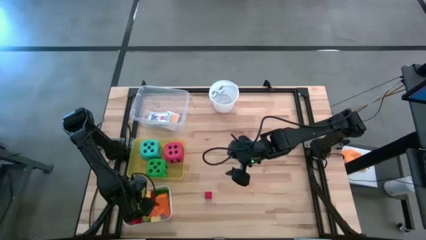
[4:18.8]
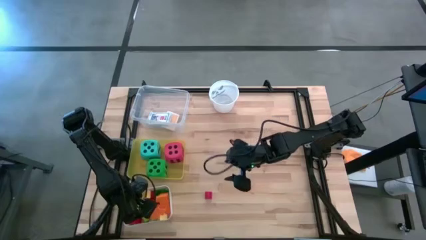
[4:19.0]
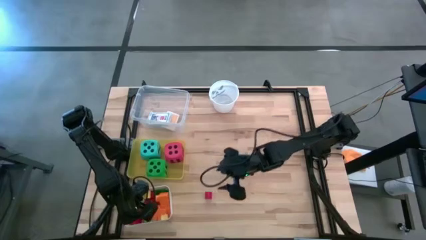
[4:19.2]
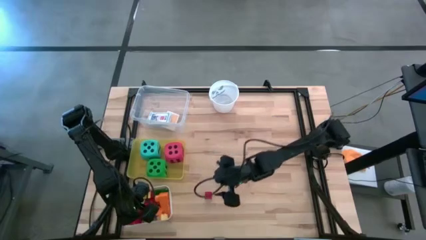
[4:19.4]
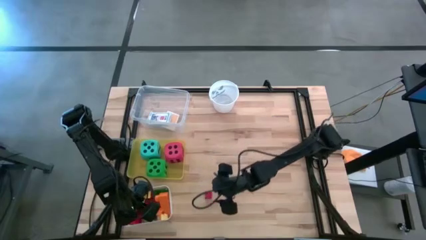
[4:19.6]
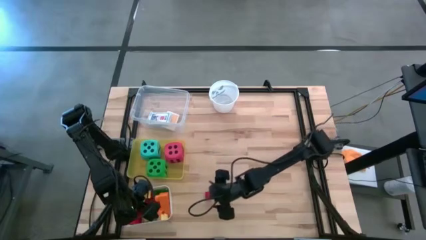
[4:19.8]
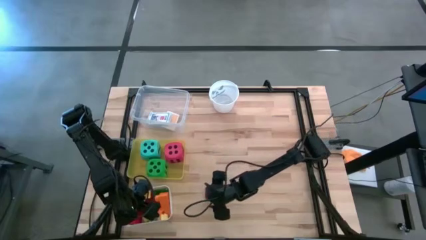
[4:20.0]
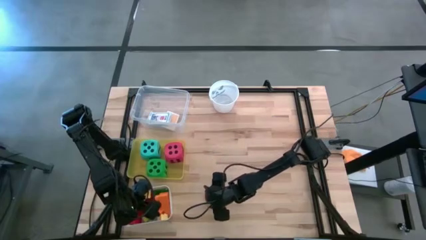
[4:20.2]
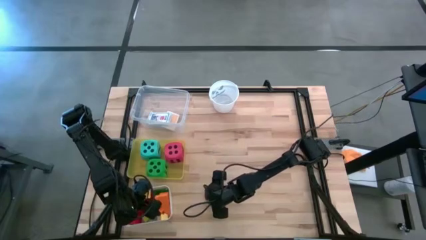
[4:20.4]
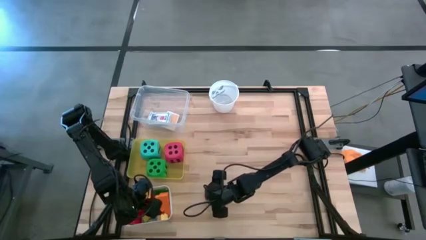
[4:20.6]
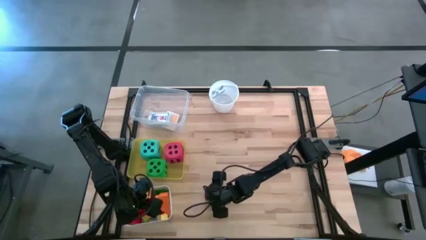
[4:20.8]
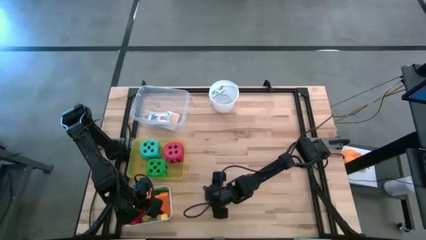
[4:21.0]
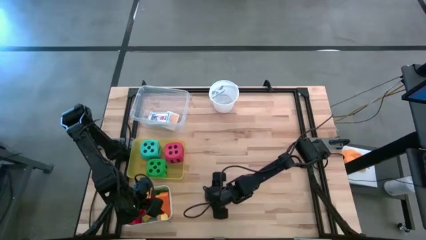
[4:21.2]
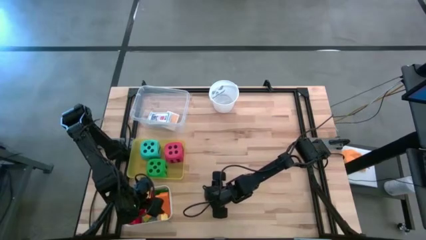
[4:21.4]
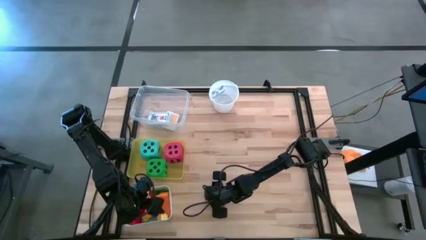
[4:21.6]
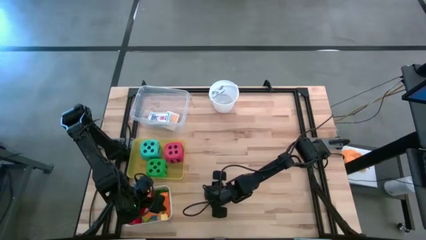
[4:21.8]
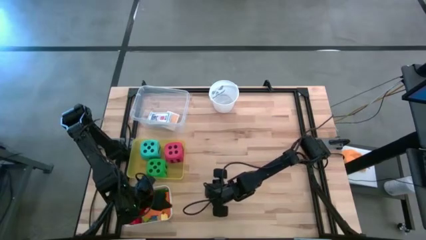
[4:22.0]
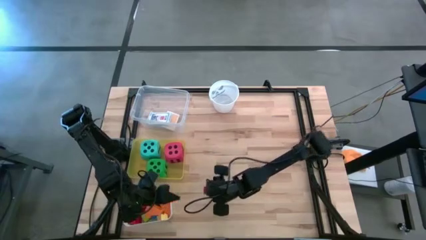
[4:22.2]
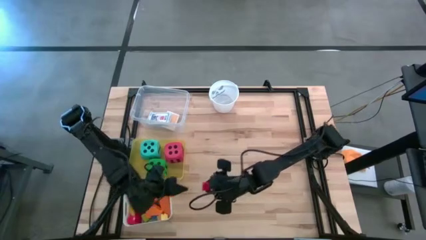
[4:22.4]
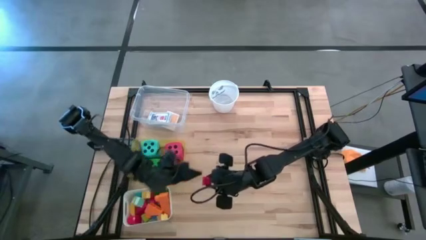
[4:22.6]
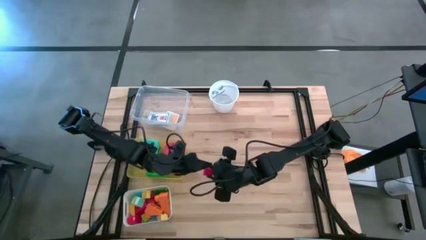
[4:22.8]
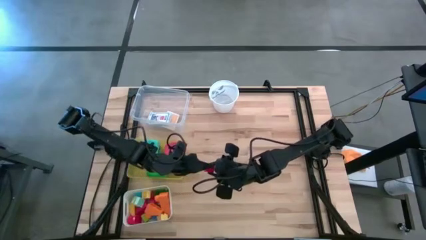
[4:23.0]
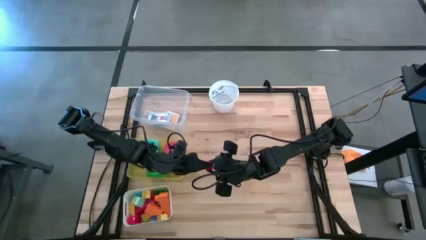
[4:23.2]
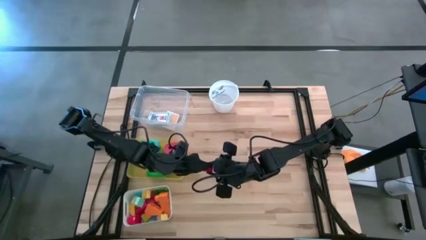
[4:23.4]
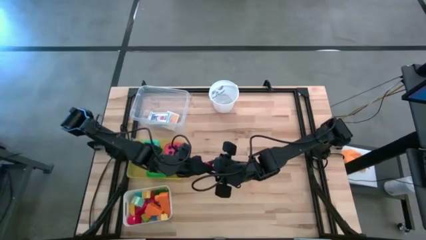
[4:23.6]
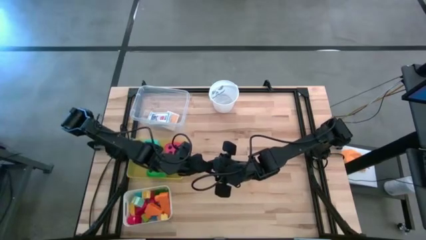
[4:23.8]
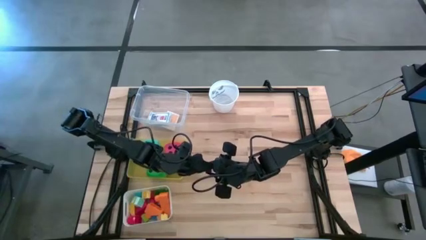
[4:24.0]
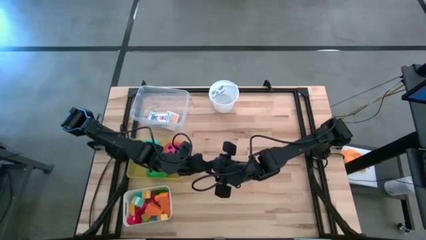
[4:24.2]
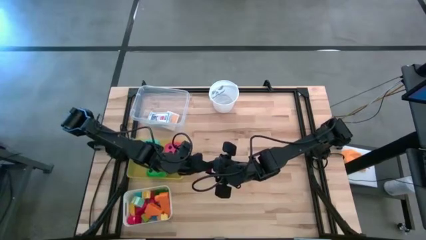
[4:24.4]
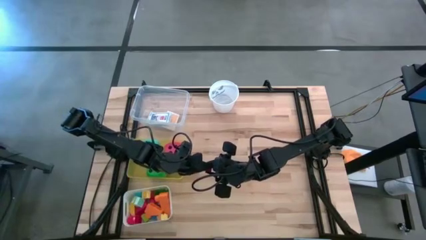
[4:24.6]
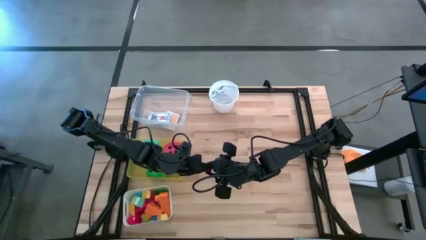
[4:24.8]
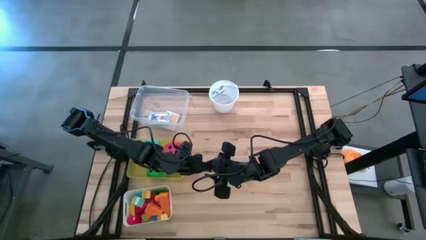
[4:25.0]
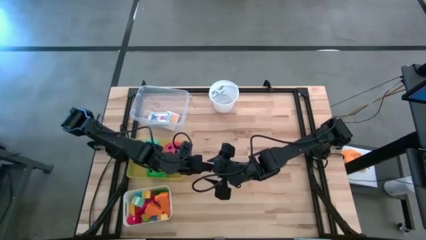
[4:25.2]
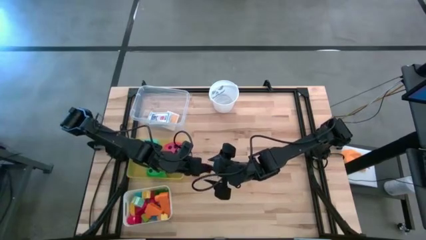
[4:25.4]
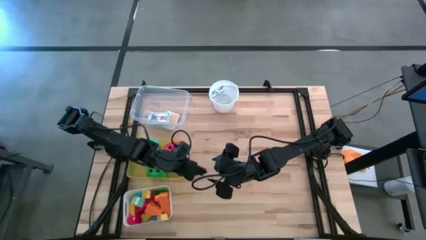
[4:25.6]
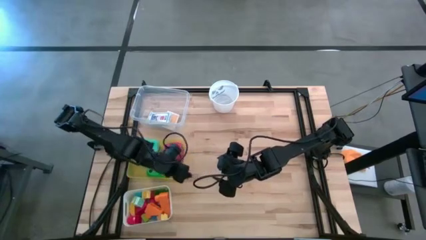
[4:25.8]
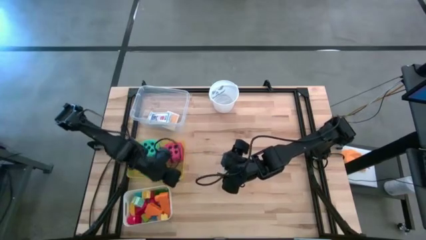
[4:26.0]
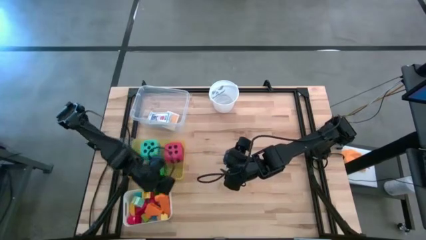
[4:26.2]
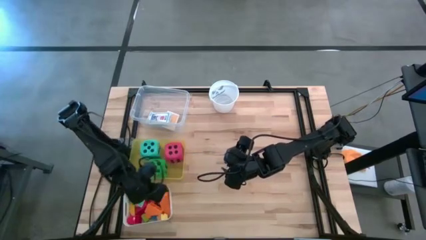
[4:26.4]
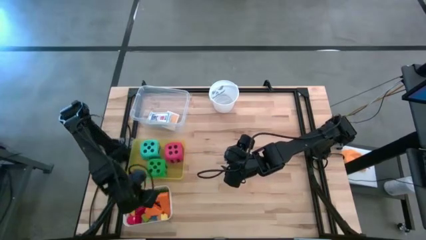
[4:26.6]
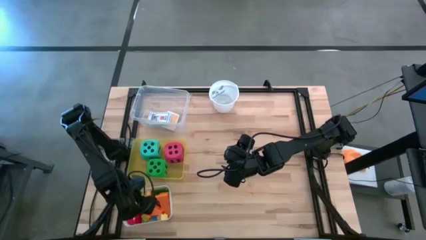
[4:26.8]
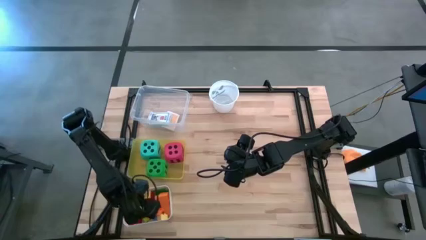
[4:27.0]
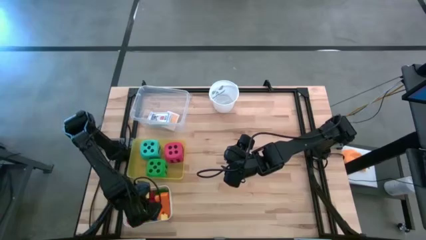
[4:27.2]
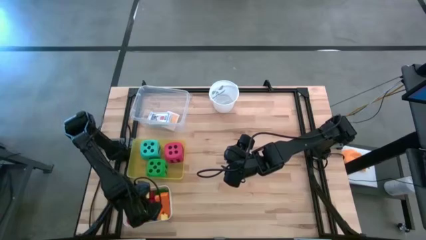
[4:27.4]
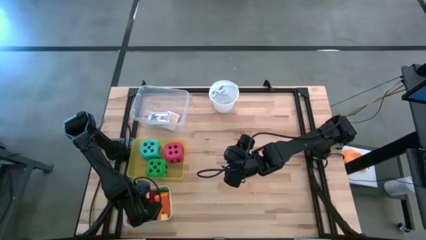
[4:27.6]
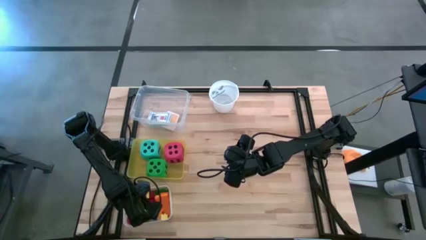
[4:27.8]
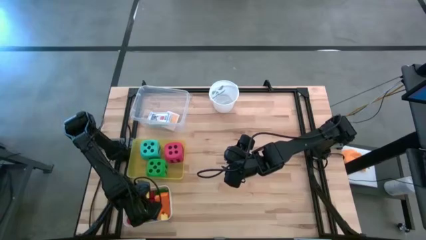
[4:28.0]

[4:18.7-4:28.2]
Task: Pick & Place Toys
Put the red game piece into the white bin

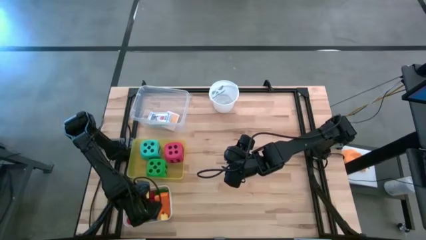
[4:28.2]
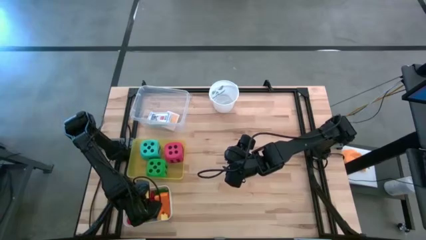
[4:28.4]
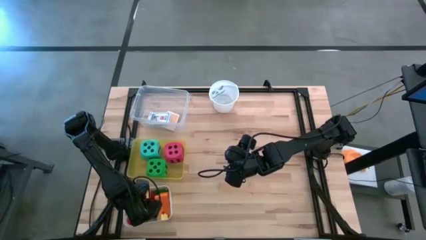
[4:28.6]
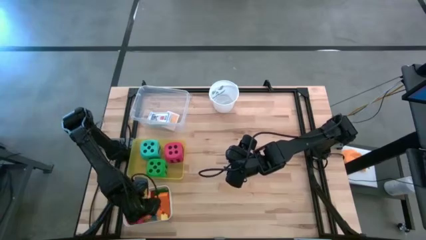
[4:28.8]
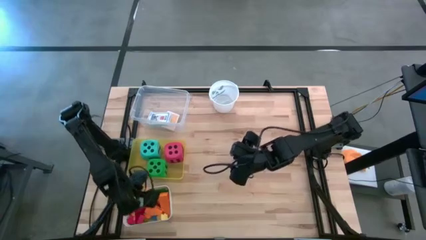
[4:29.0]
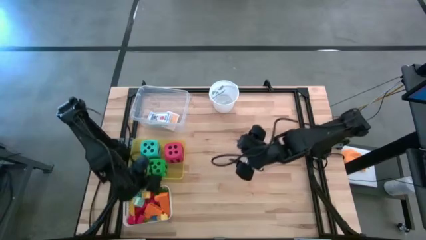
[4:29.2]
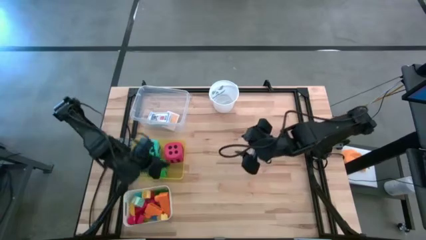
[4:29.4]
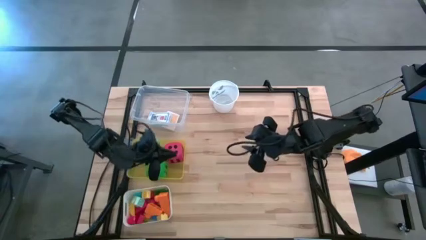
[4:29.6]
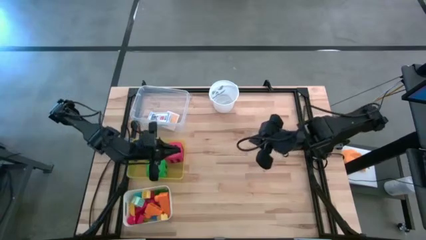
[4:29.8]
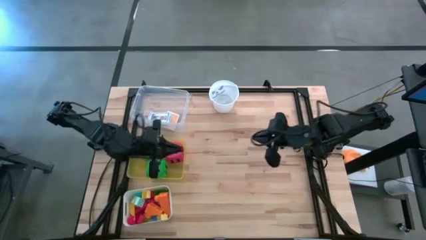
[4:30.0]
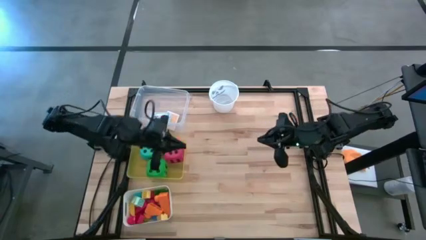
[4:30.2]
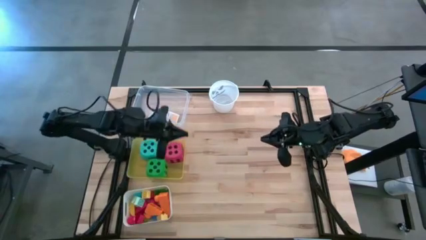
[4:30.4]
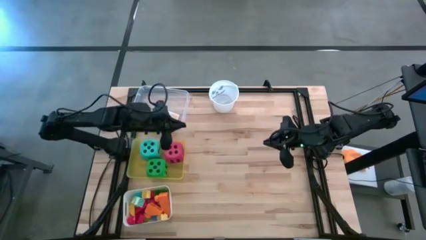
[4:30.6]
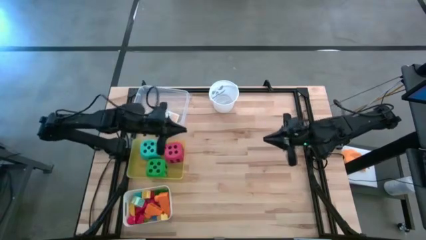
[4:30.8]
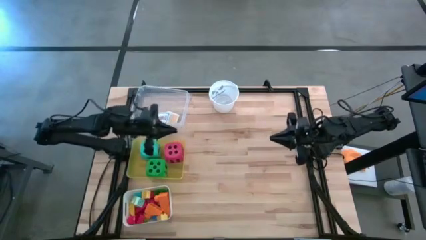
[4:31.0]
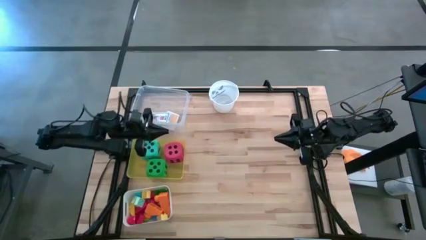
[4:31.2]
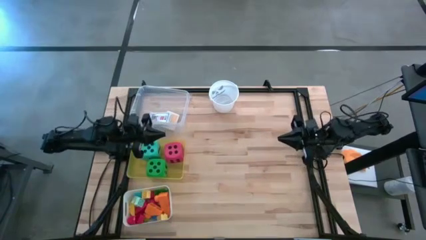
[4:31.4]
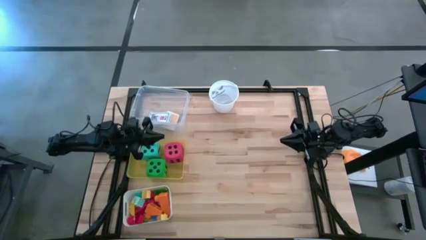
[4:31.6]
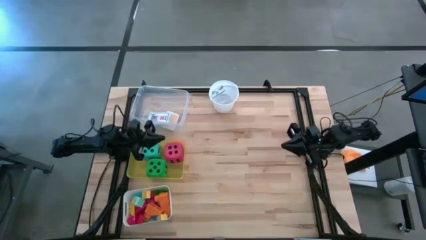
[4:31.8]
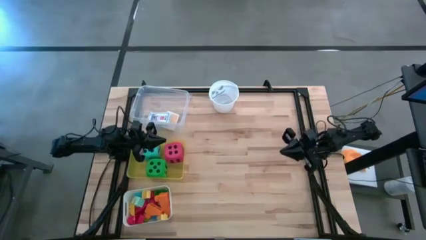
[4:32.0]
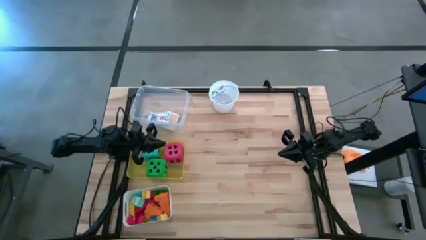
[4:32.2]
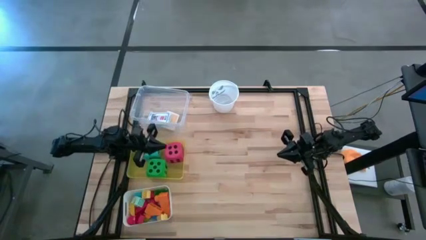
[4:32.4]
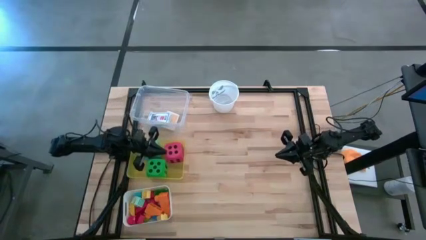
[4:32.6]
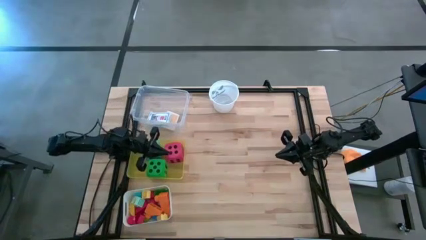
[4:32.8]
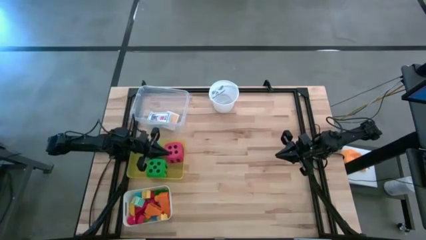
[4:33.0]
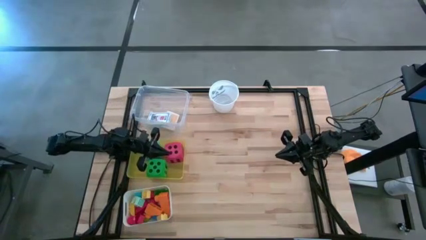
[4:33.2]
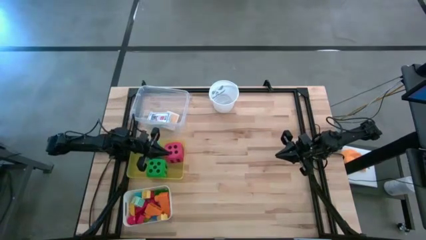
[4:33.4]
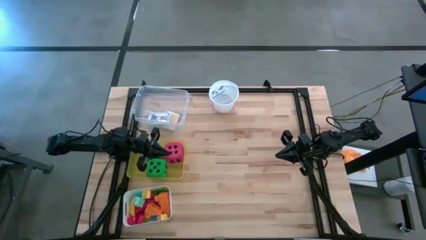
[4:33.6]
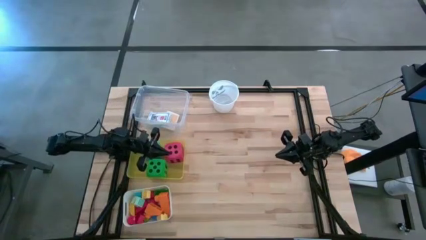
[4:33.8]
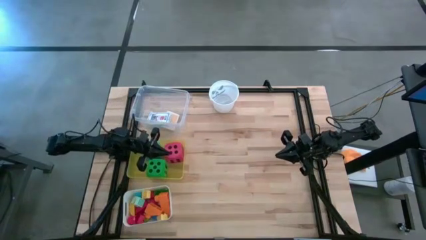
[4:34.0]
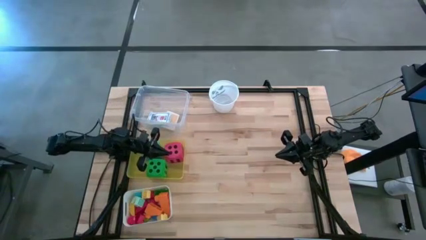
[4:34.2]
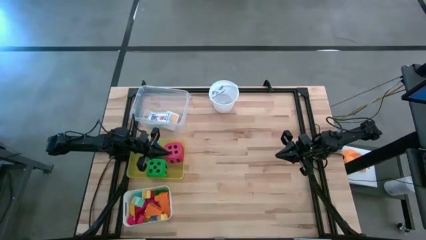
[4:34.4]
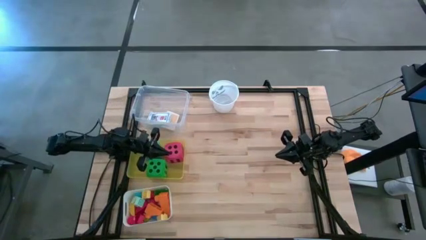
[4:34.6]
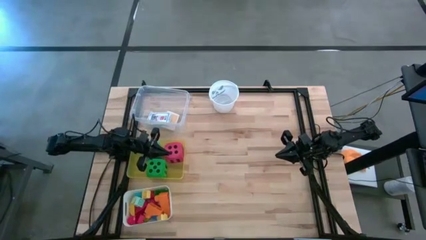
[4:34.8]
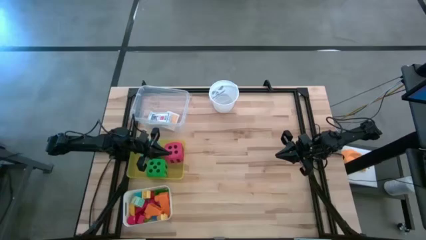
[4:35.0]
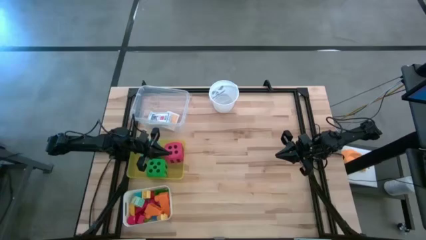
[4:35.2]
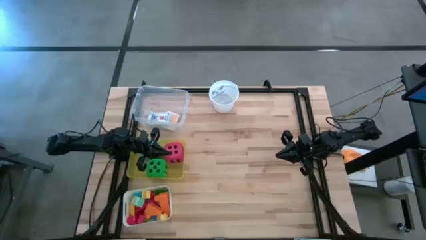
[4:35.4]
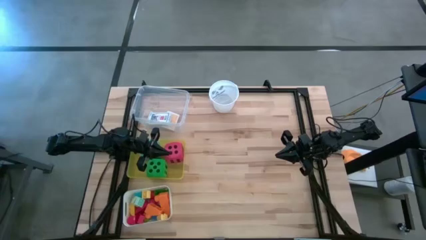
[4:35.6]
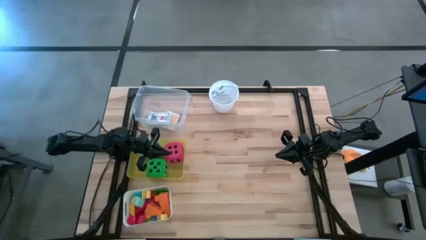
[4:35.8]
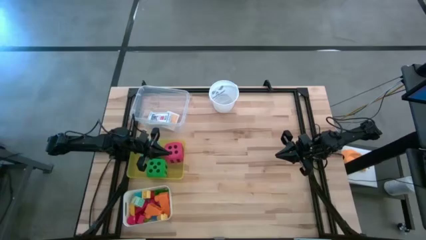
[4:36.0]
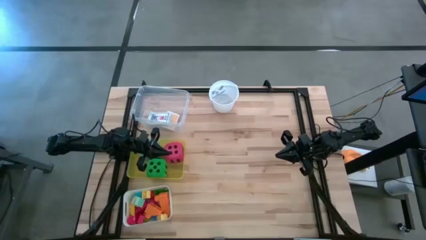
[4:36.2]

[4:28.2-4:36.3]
Return to Home Position
